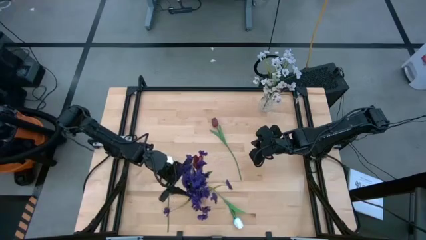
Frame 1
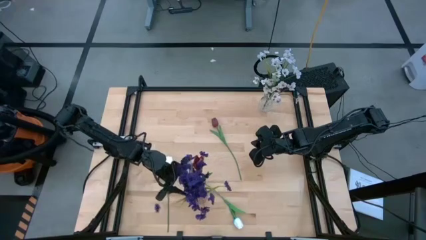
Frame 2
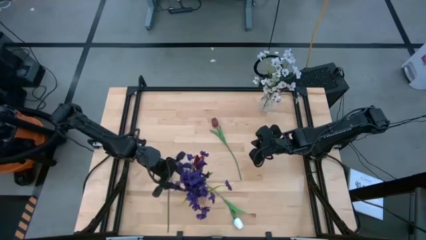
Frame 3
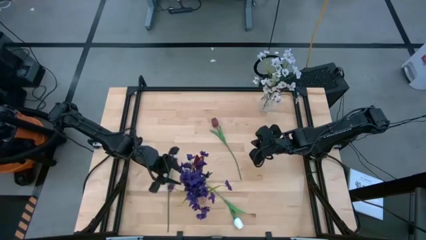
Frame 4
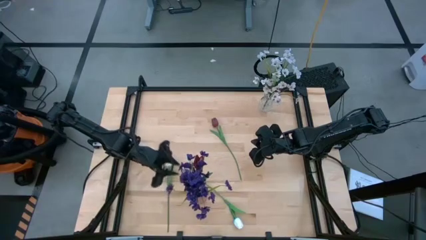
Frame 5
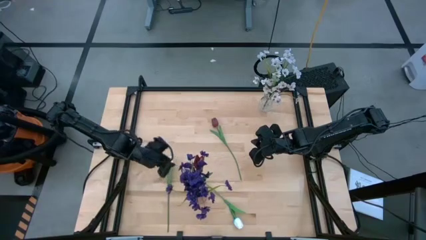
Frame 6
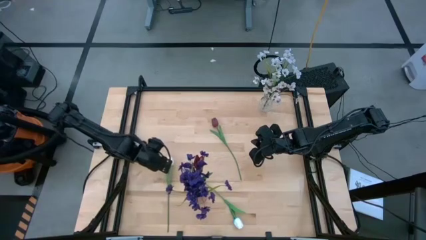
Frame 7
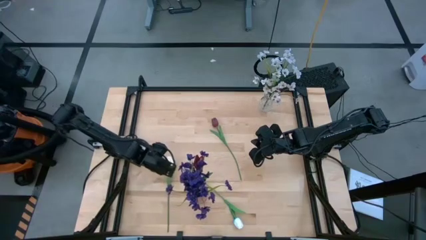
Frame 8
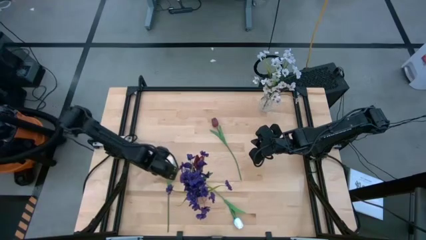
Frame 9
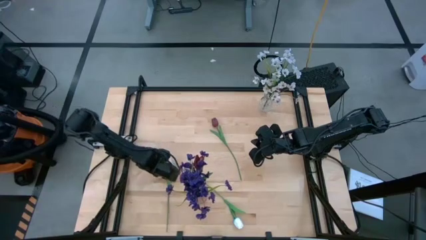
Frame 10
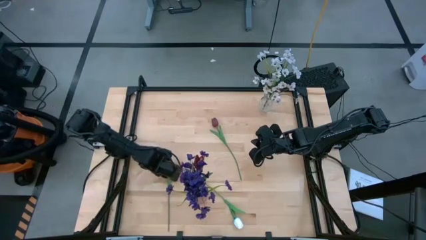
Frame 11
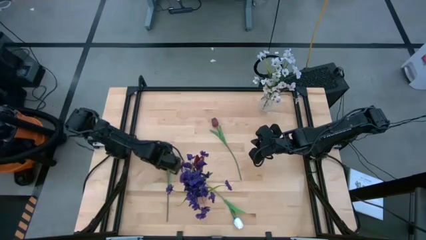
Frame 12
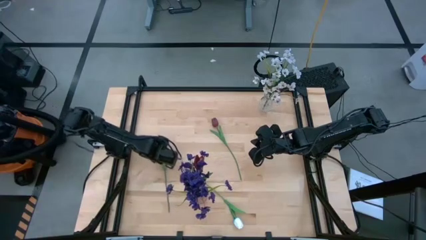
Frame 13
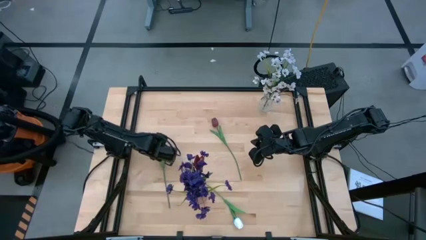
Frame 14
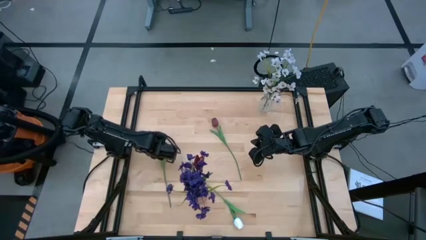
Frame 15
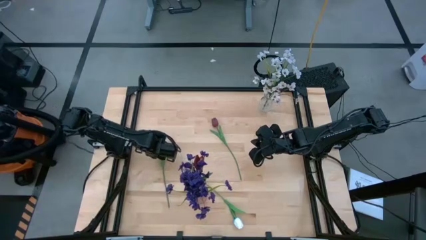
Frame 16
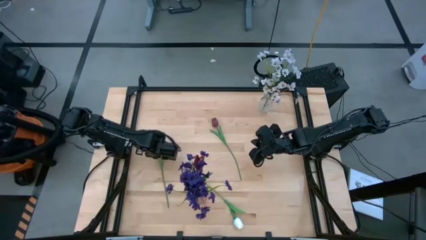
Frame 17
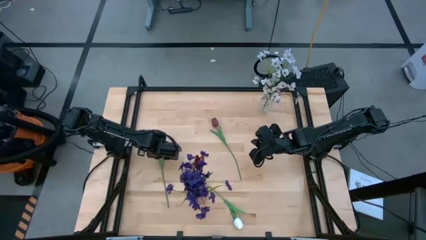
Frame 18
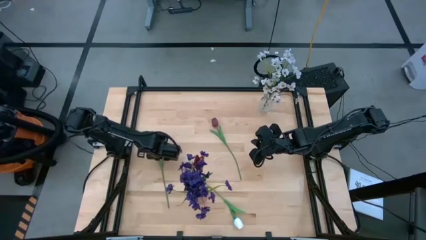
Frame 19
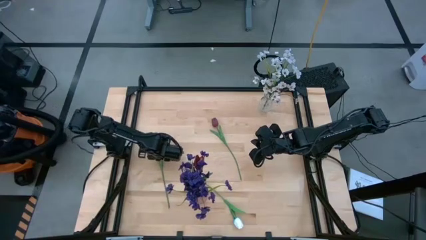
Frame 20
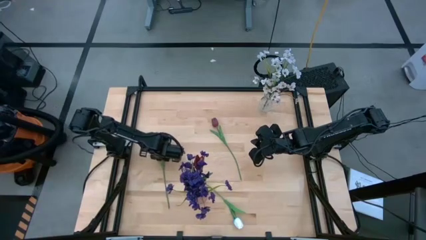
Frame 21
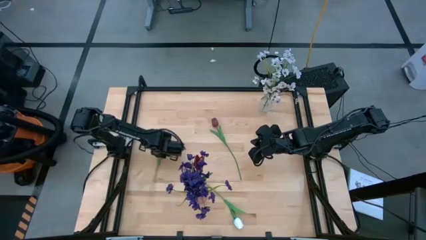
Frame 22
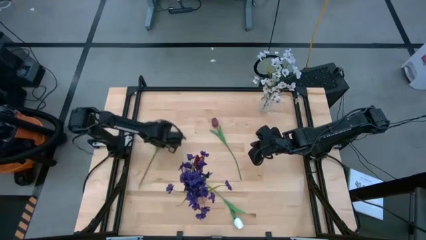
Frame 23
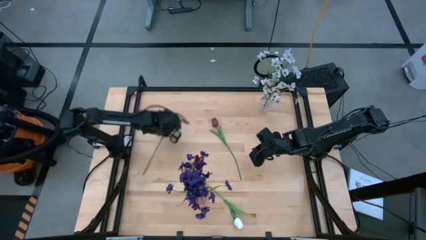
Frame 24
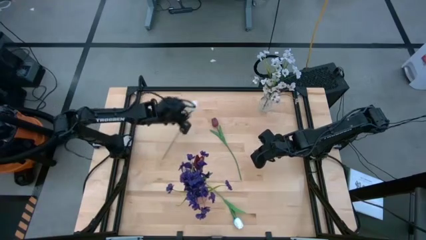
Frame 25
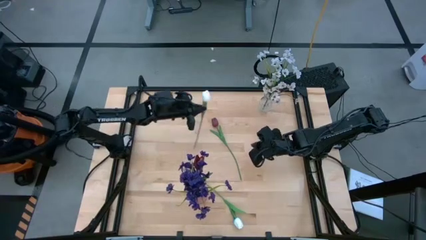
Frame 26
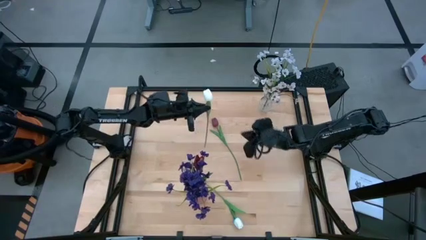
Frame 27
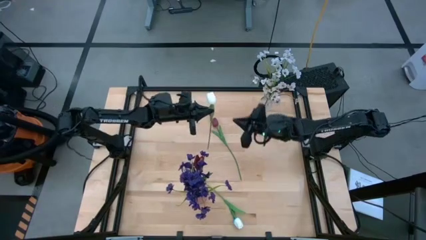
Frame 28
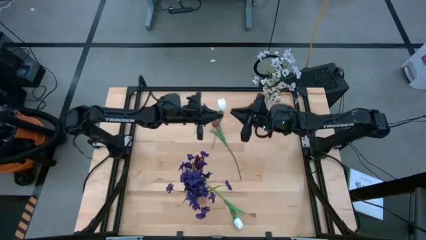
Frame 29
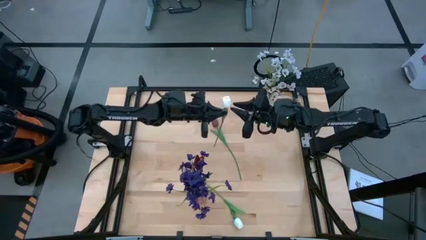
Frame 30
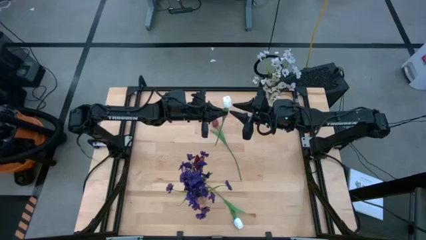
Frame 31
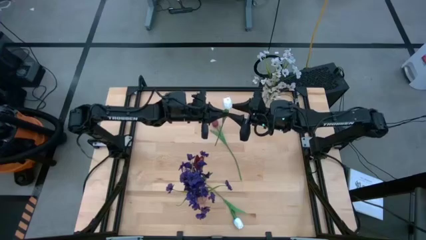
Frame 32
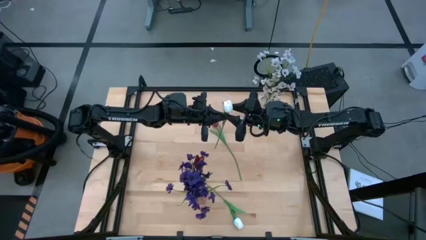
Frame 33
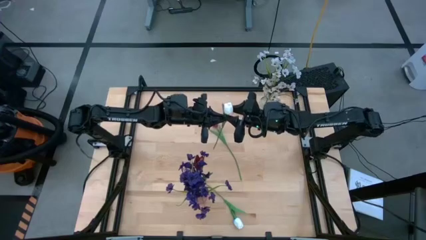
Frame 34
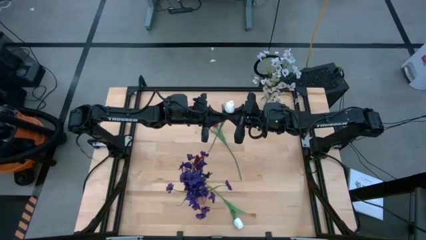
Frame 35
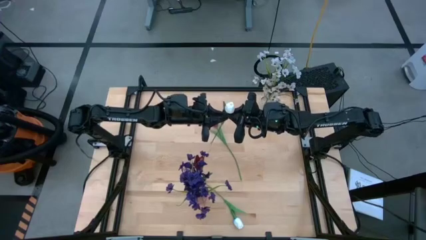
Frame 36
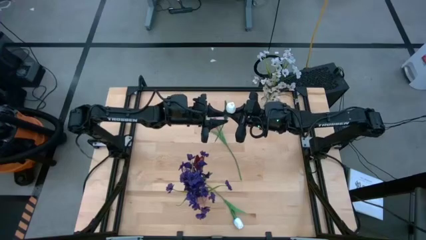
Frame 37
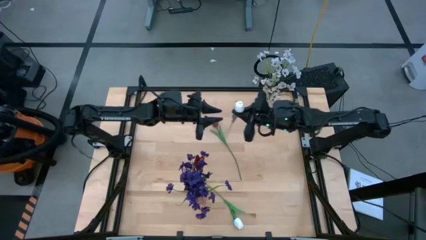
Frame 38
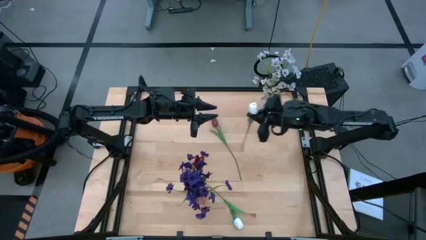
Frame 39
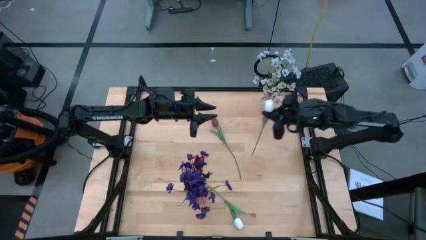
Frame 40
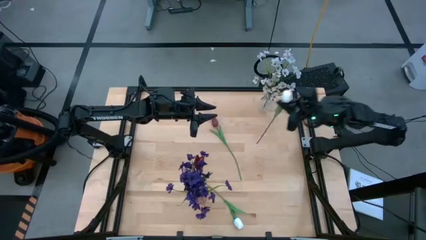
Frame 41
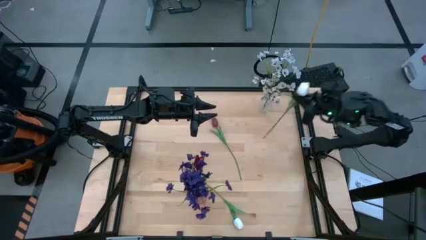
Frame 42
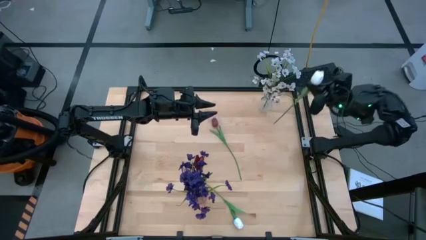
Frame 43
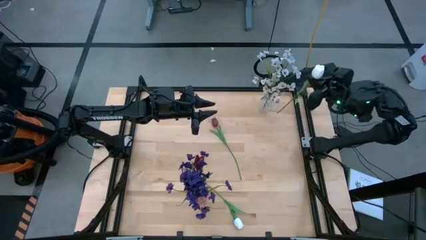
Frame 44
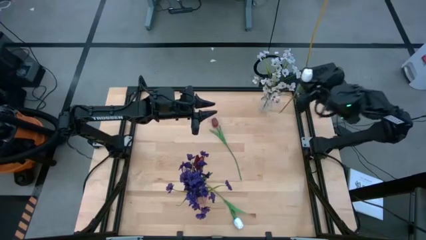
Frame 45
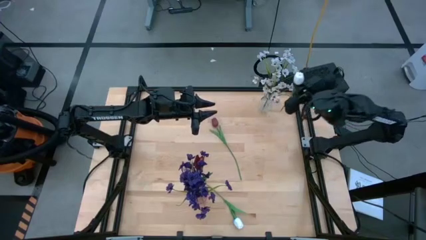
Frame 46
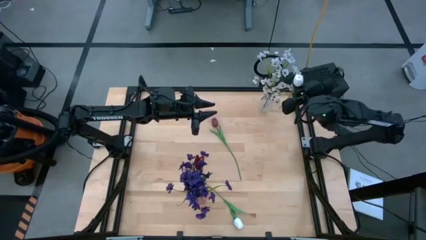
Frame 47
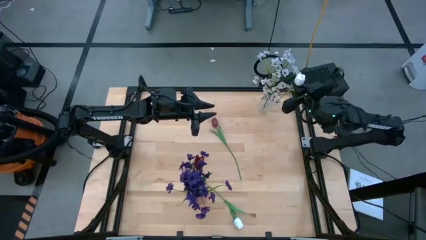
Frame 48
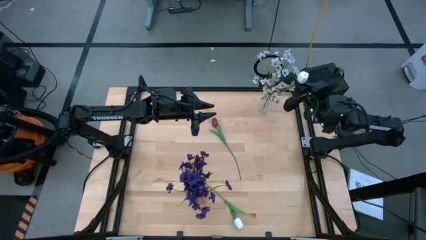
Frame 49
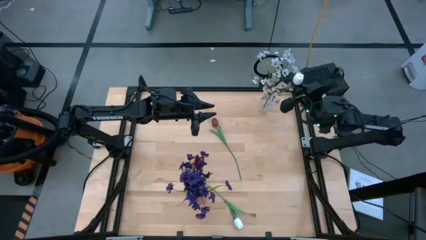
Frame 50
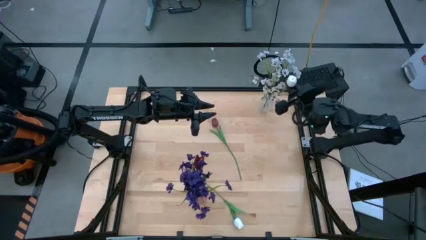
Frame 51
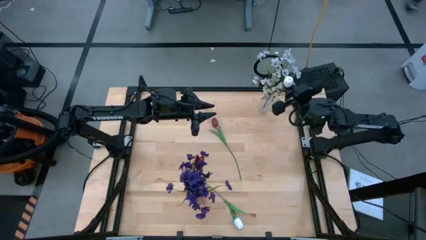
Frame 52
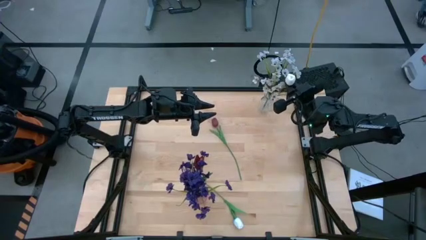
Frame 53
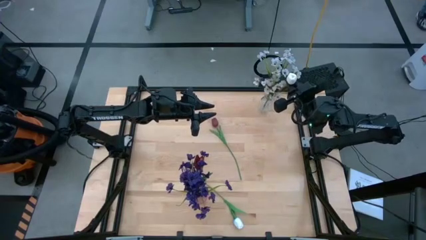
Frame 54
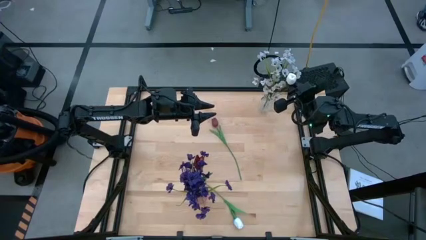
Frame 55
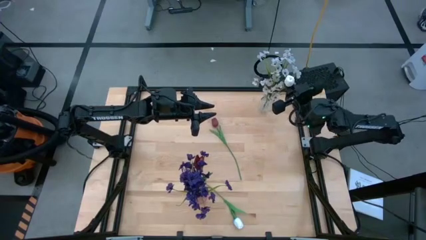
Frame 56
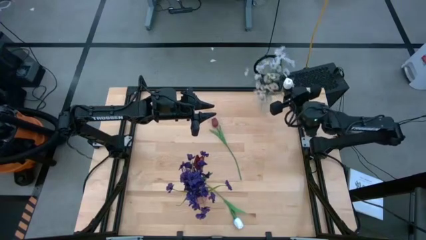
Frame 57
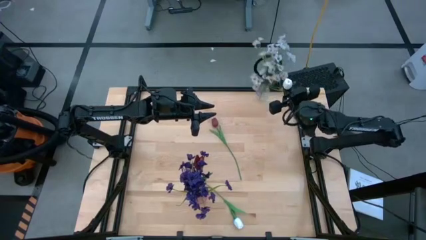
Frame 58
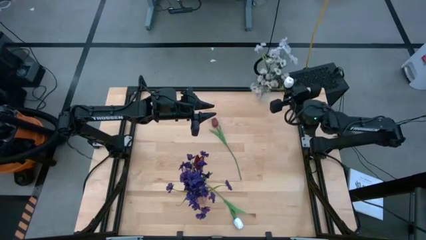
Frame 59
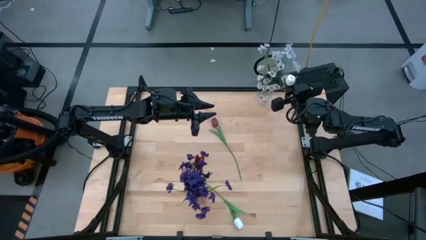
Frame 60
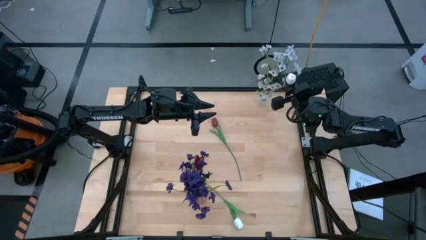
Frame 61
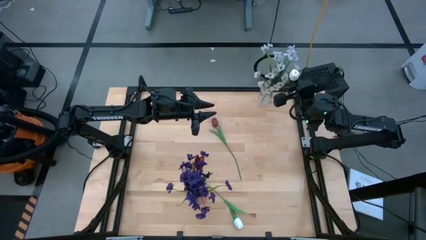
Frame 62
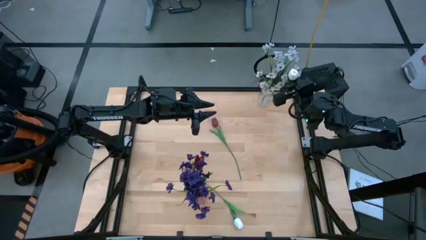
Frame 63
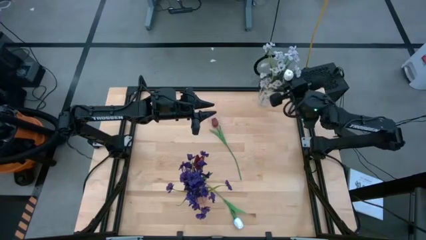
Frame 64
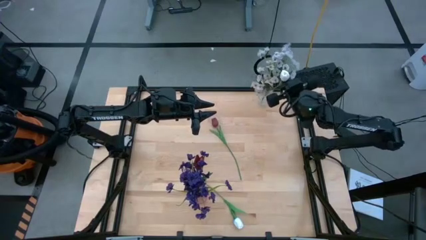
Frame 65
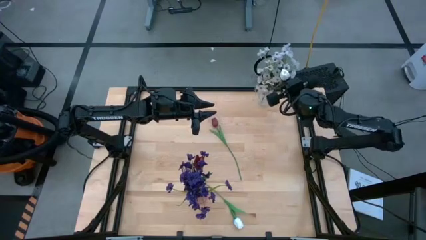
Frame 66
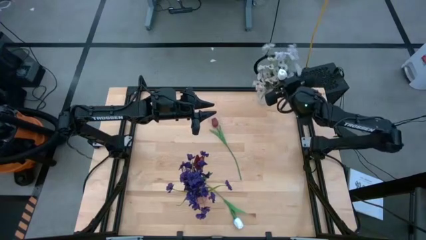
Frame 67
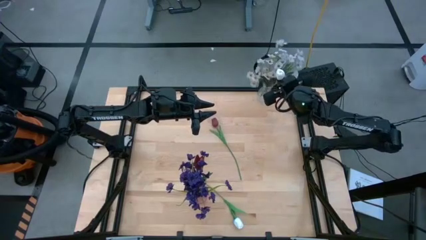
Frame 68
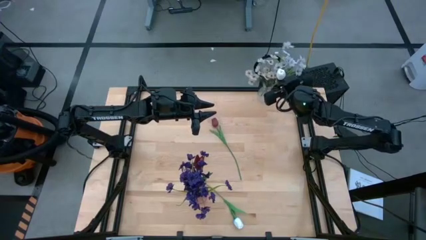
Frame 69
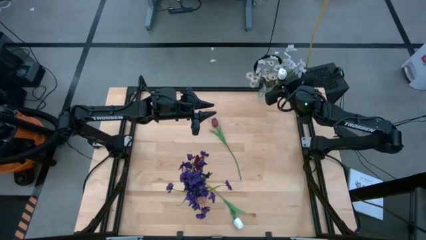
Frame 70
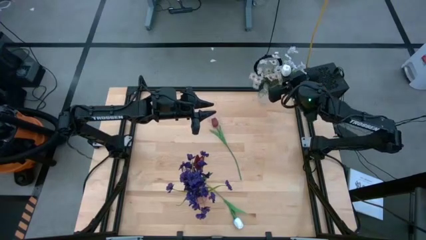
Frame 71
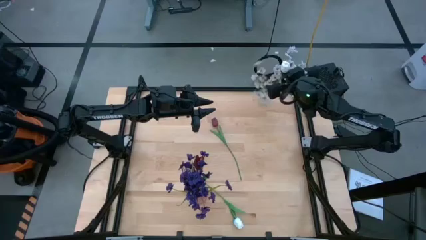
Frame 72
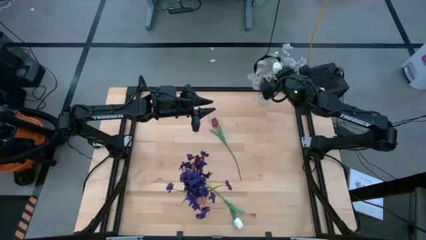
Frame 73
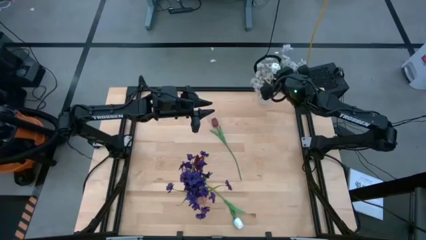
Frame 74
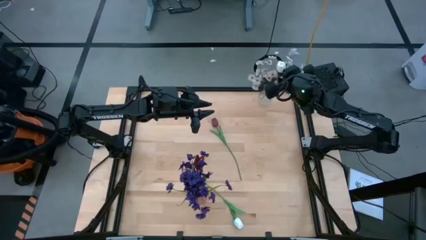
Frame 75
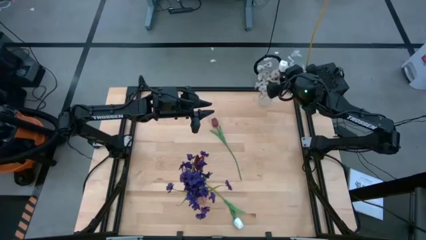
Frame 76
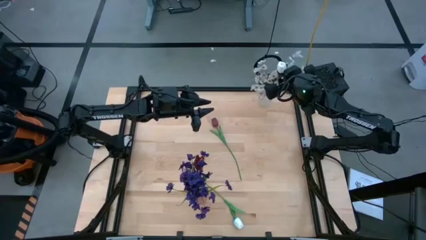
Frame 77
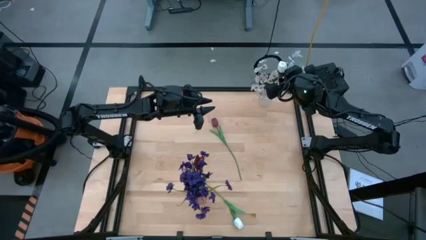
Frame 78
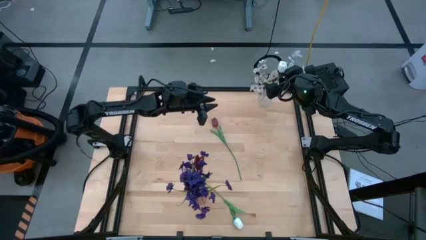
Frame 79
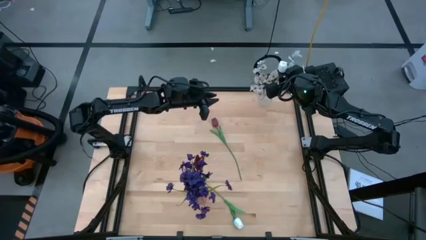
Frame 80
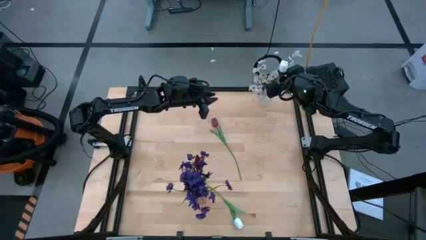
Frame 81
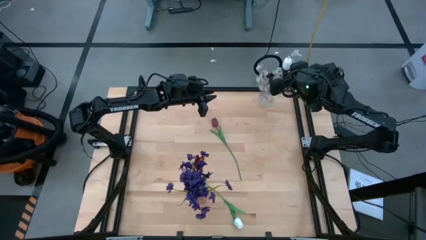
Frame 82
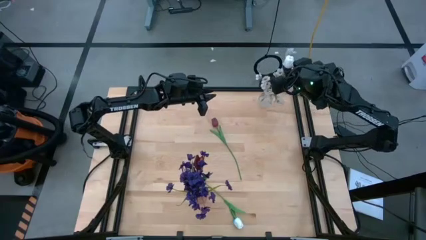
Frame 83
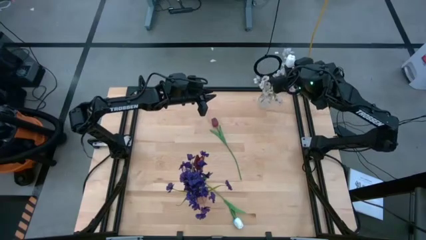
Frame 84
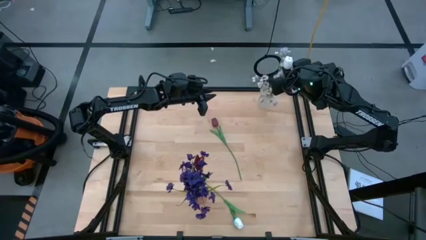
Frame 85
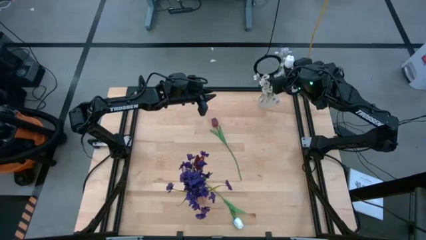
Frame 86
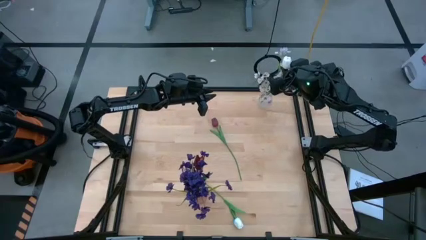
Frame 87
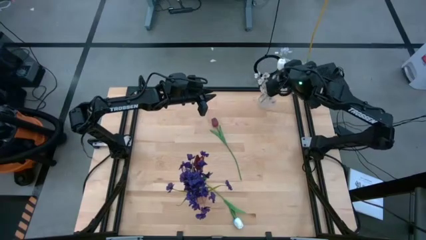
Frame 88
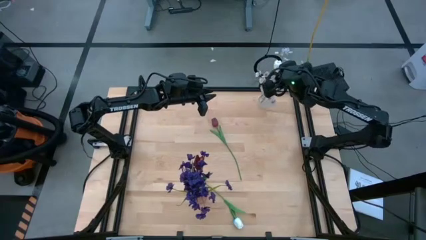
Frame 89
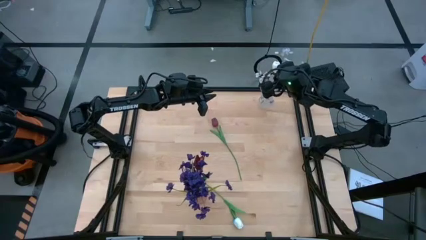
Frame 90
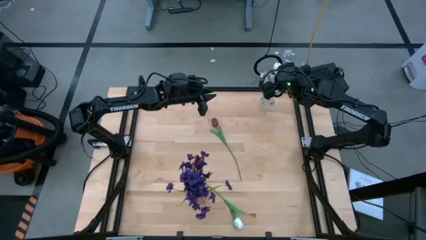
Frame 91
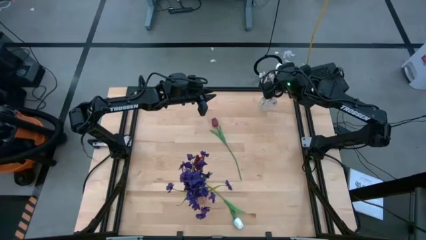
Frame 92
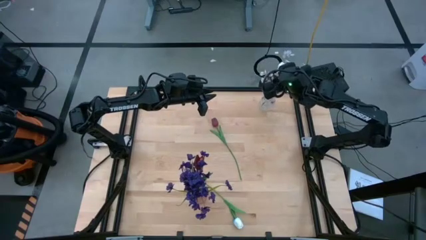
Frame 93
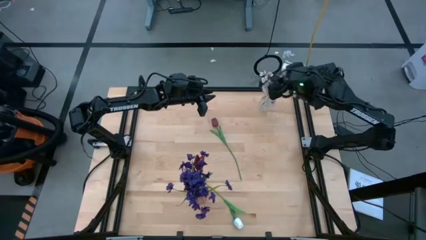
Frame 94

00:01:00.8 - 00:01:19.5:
Task: Sort flowers into vase by color
Put the white flower into the transparent vase
